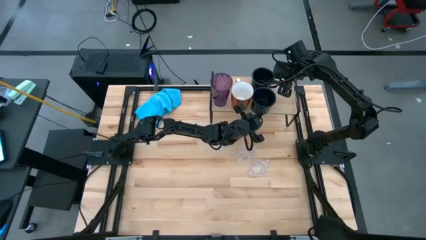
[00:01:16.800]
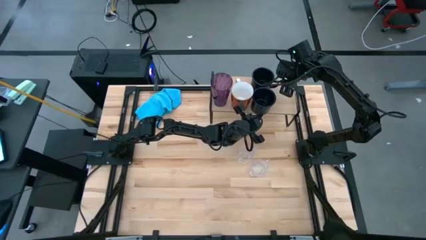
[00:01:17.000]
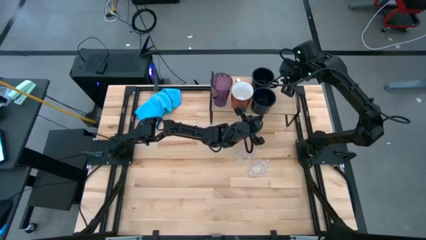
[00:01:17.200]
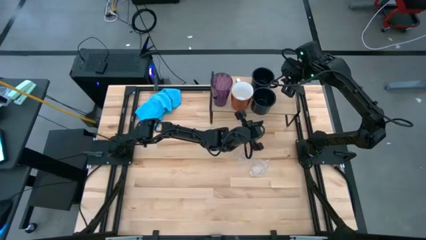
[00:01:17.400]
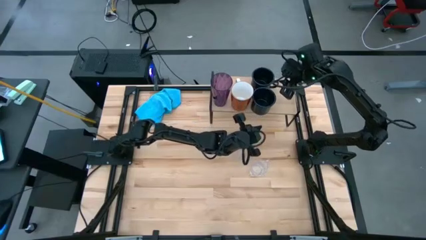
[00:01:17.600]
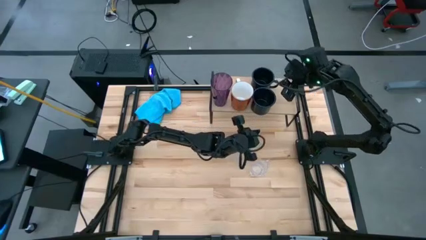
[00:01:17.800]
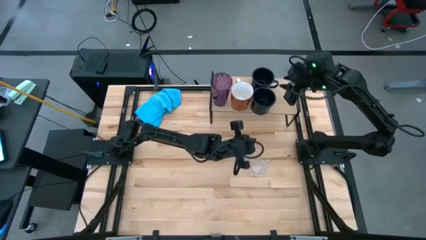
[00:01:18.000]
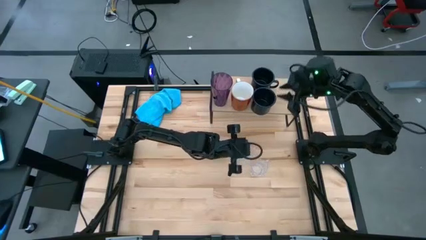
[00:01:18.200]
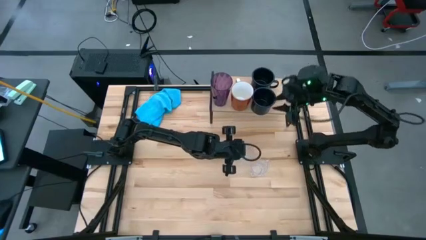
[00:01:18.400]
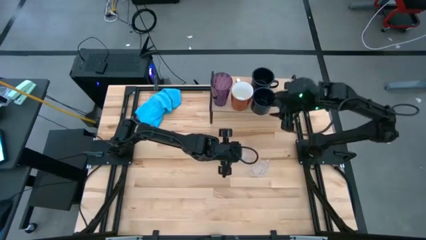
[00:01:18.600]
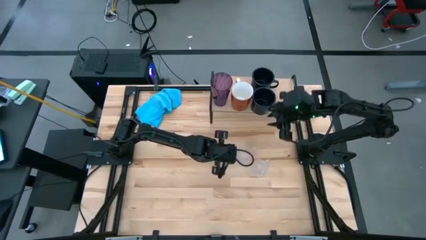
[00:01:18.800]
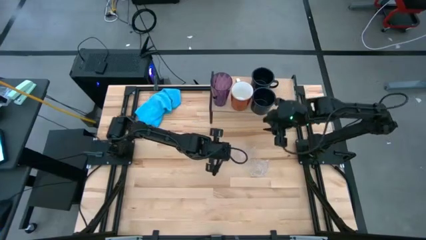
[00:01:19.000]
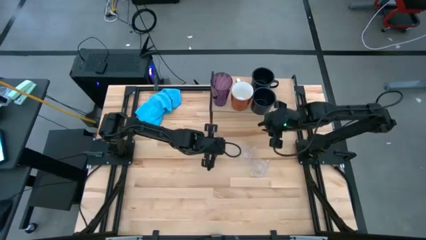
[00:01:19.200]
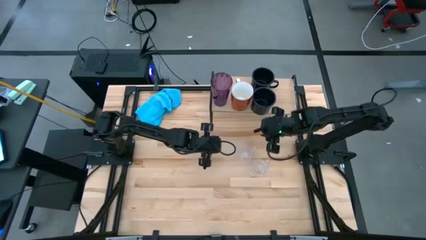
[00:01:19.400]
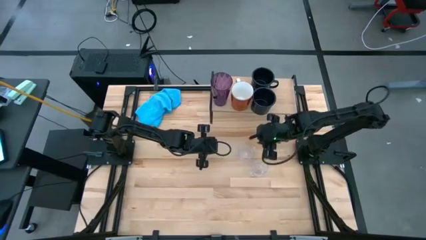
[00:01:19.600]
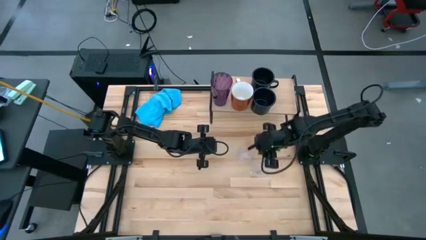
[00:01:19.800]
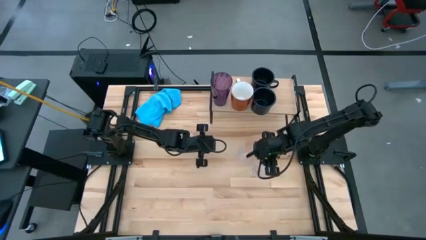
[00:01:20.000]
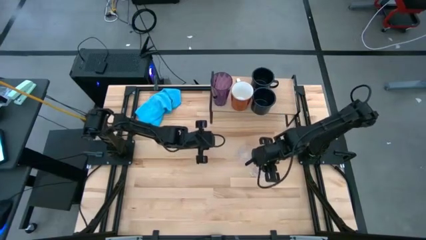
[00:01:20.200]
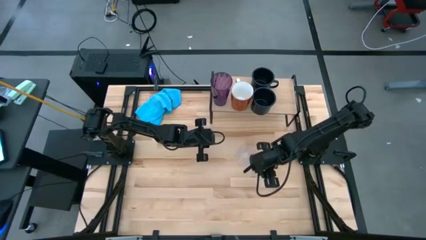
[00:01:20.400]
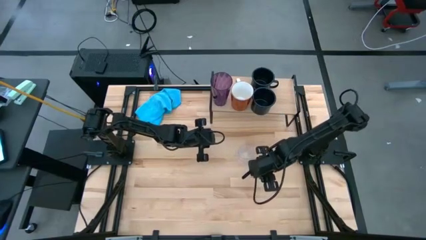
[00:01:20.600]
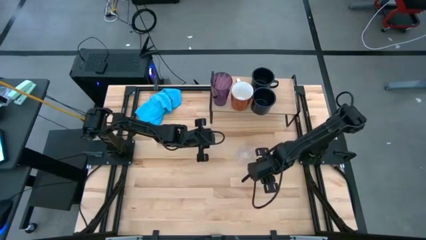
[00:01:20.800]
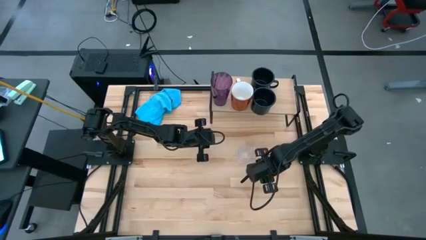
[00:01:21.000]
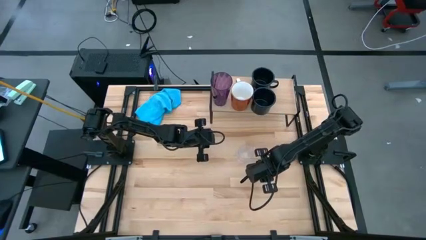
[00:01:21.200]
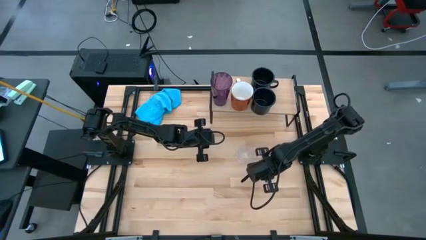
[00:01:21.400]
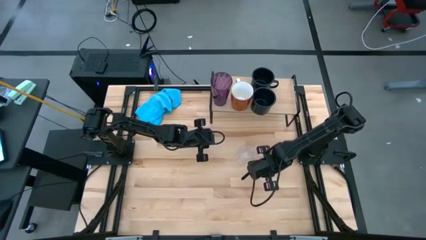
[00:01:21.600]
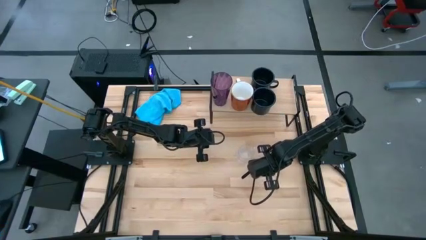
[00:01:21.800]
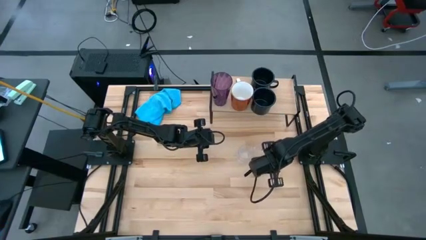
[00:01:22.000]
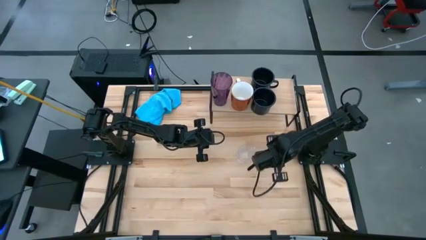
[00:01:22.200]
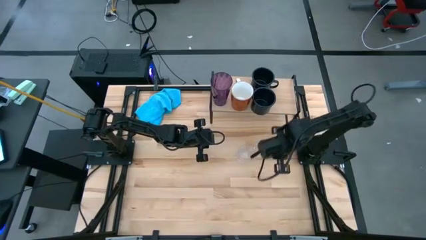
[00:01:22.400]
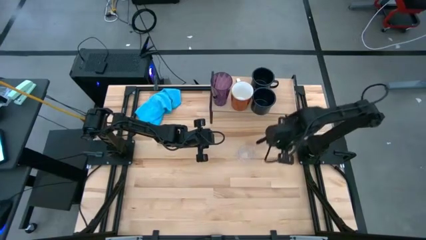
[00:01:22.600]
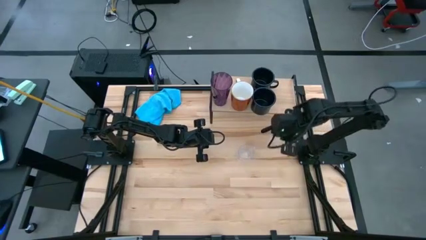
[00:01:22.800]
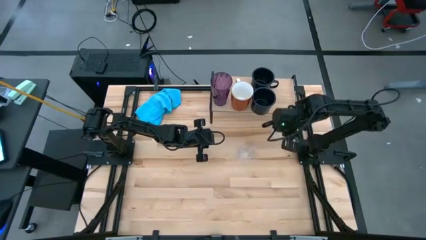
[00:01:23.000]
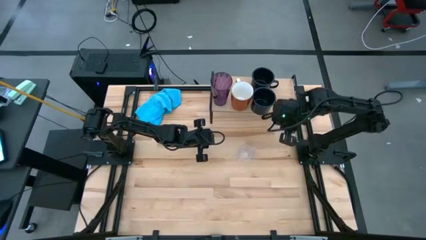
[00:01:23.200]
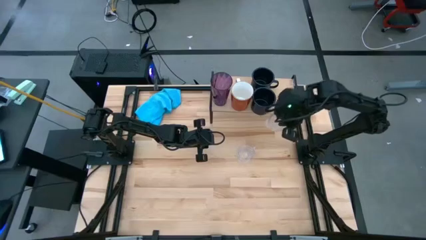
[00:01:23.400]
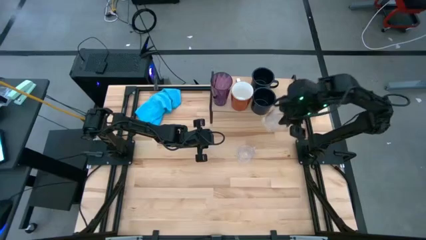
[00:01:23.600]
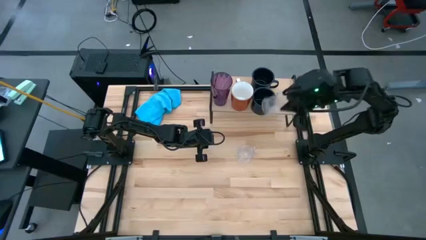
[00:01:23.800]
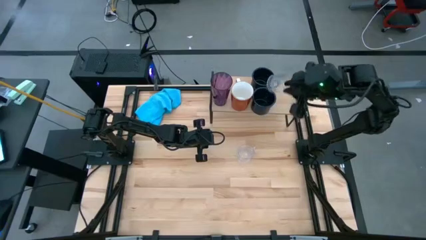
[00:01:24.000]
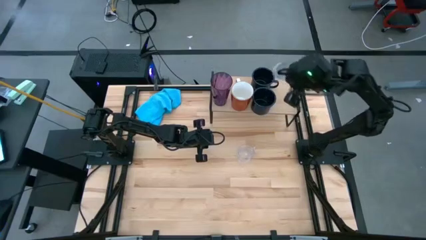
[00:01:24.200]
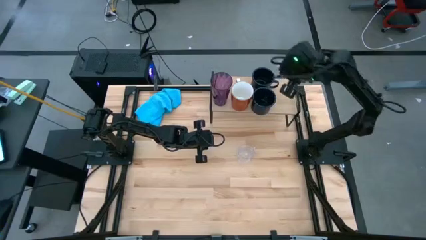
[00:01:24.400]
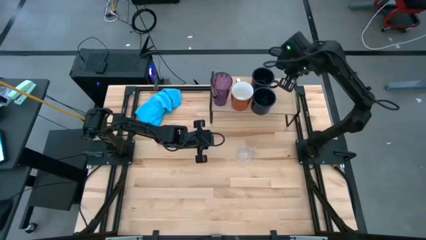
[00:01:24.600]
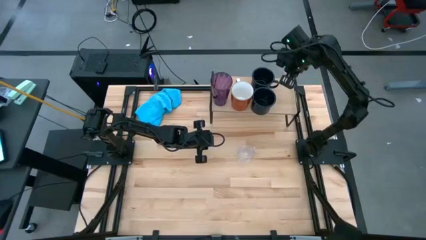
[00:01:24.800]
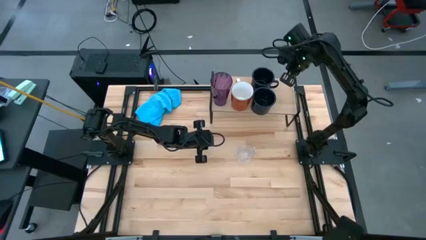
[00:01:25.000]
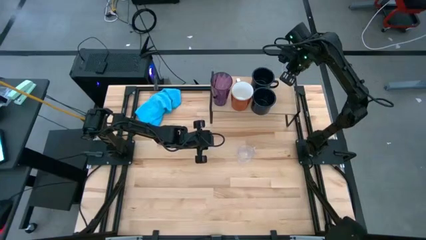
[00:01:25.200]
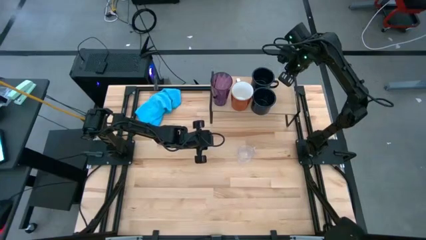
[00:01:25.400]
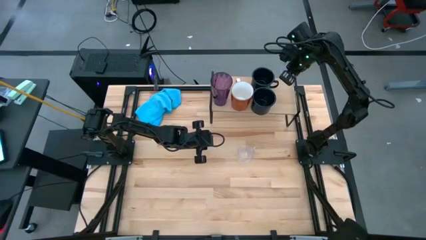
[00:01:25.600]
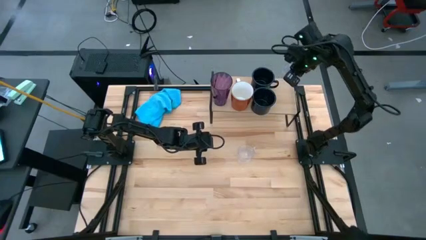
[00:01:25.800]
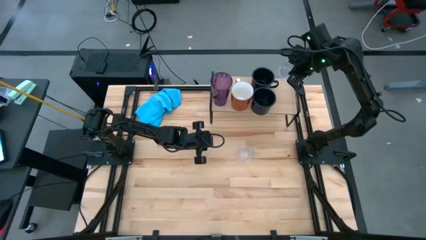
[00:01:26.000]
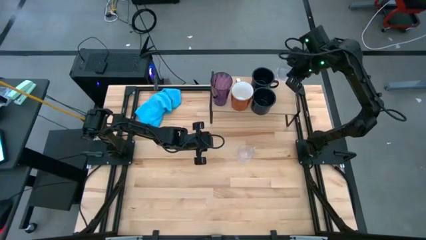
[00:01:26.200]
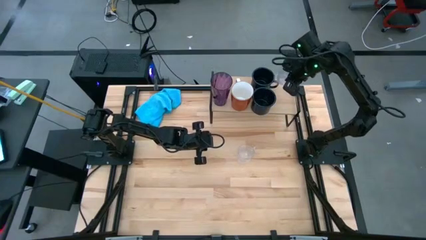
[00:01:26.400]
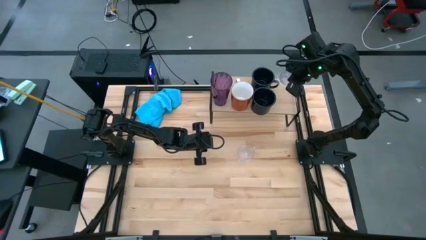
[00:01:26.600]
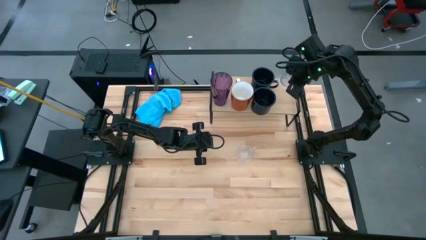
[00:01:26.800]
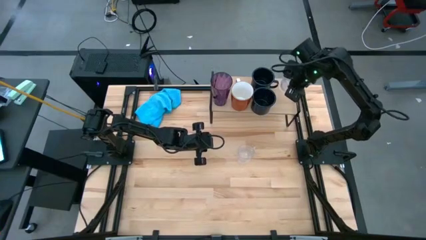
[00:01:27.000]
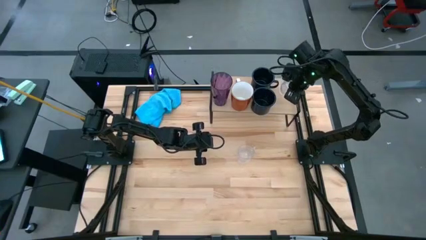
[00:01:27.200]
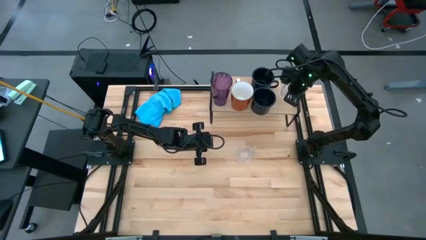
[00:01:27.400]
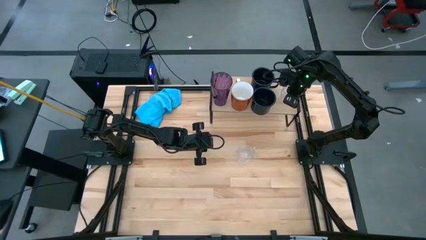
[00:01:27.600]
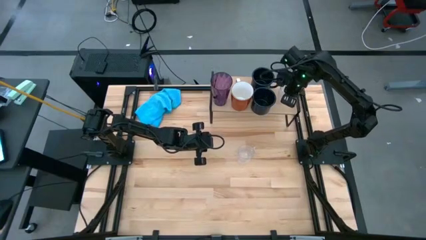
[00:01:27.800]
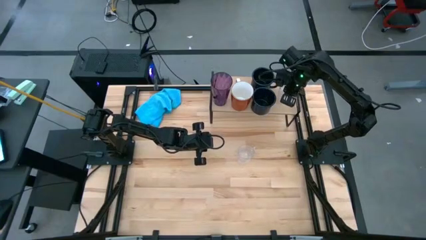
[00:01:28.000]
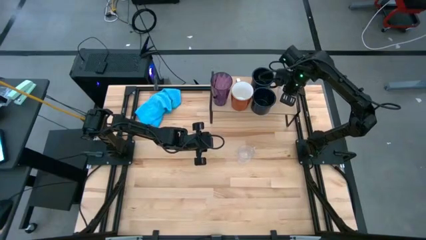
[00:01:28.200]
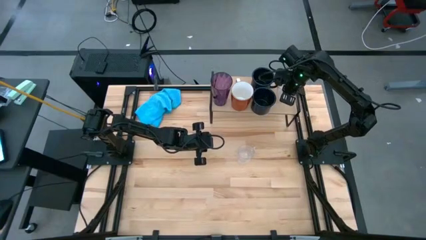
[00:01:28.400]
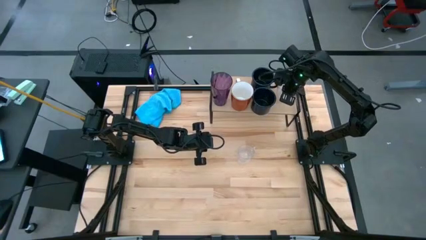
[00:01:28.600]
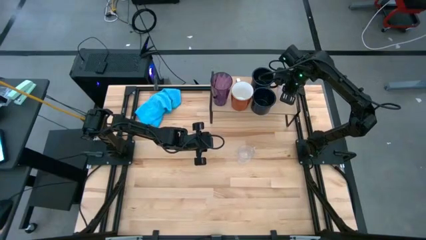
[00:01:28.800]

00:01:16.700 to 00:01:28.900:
Task: Stack small to large cups/mugs on shelf
Put the transparent mug on the shelf
